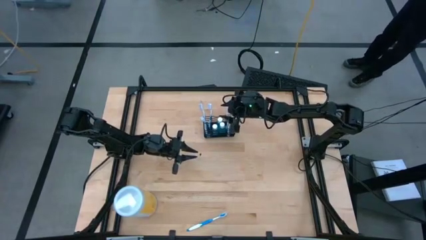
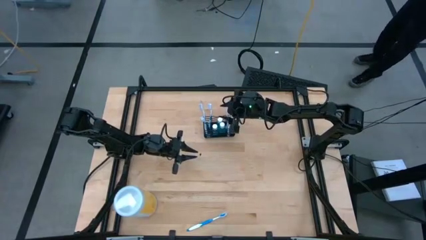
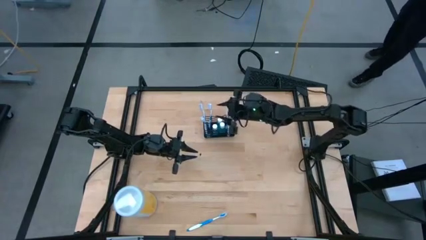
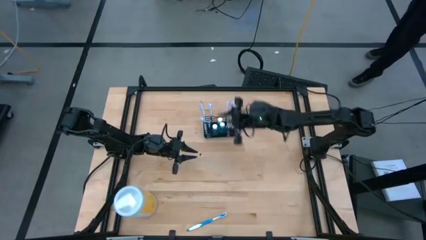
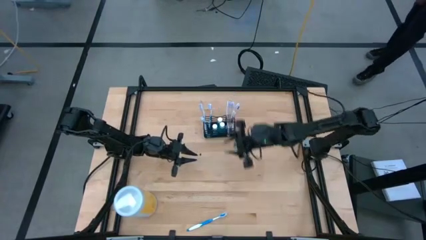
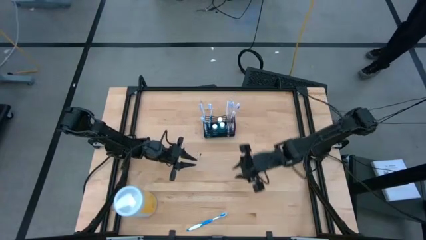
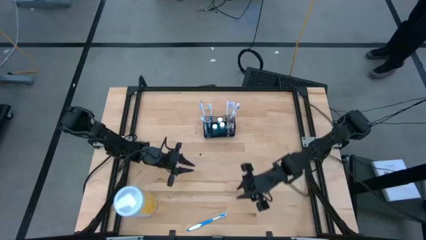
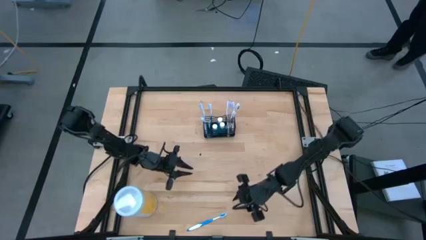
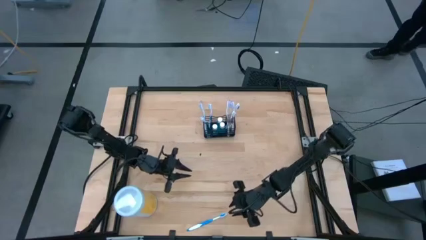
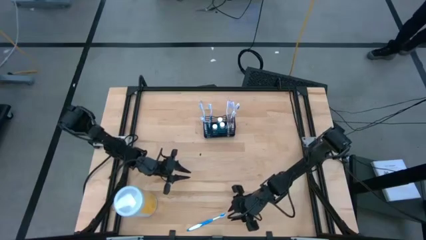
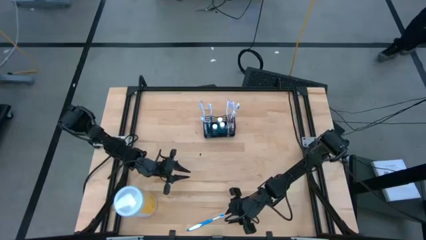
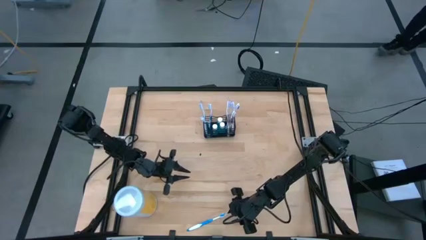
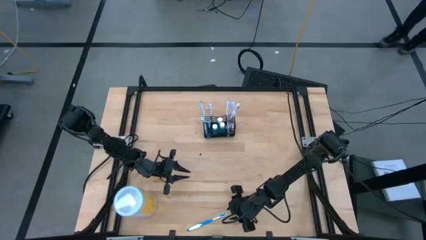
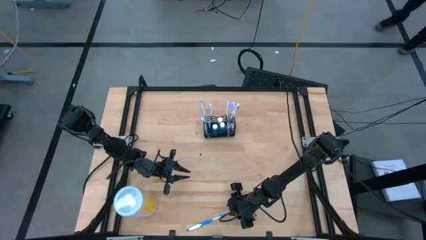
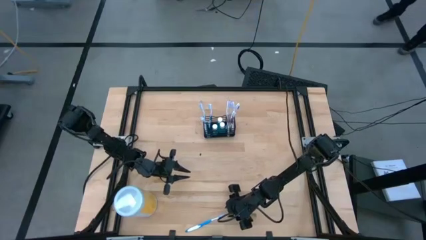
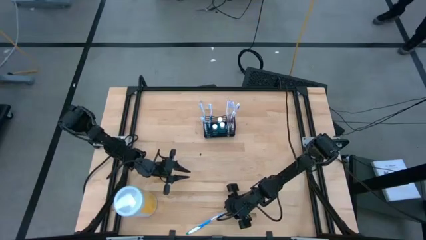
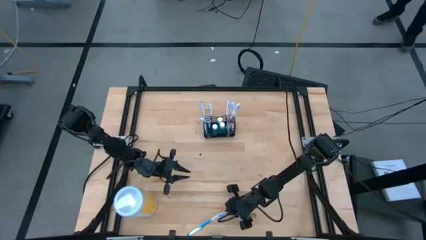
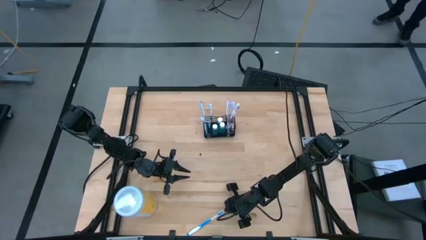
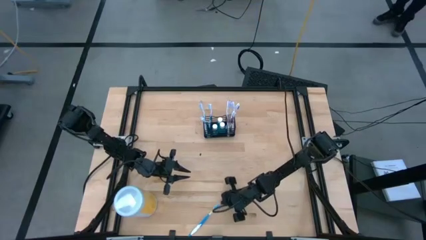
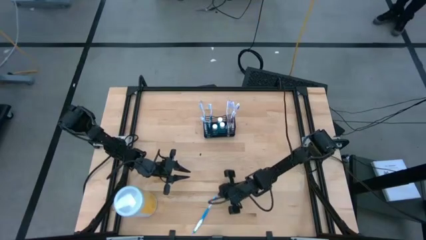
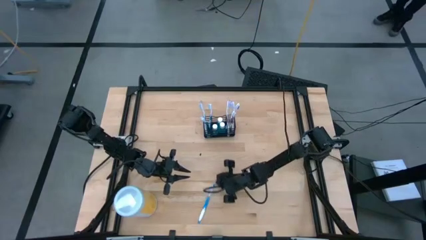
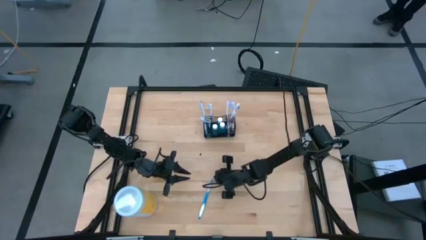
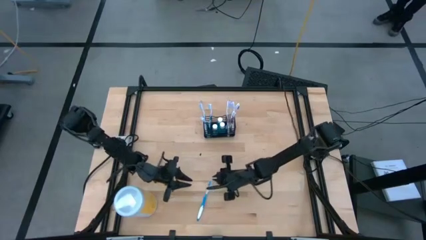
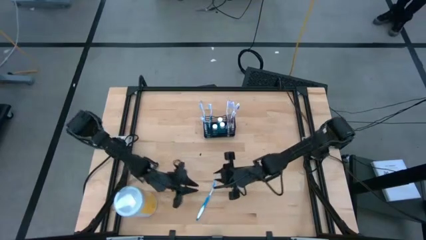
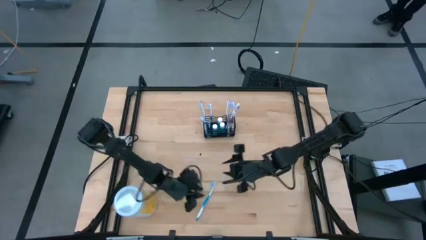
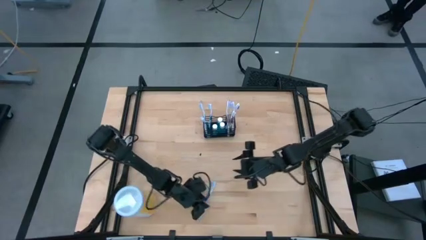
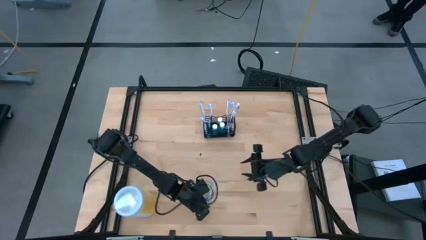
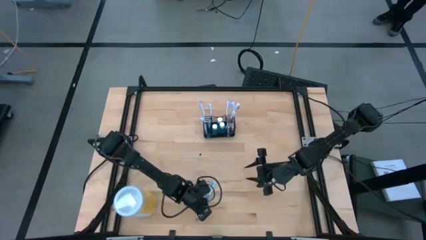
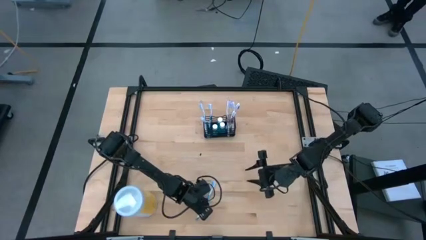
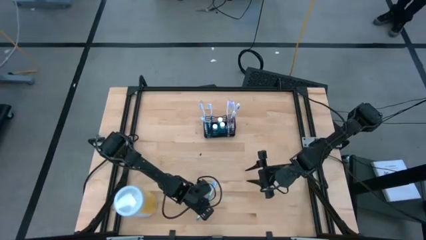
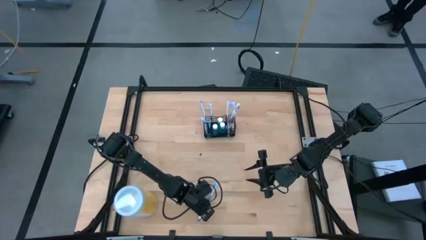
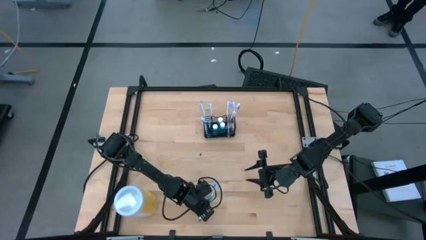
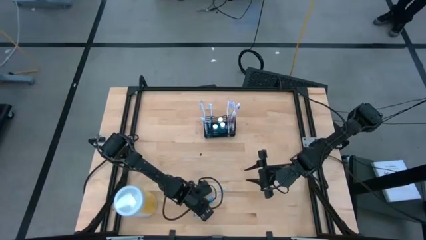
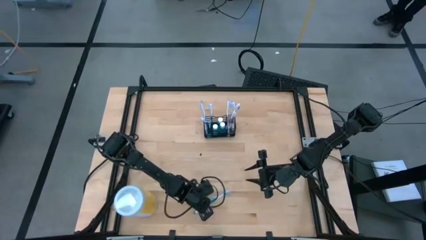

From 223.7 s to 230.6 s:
Task: Pick & Place toothbrushing station
Put the blue toothbrush into the black organizer

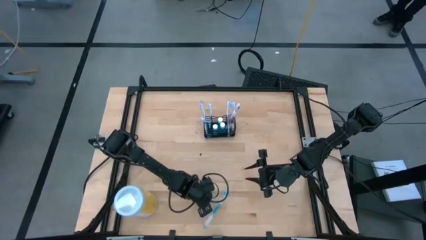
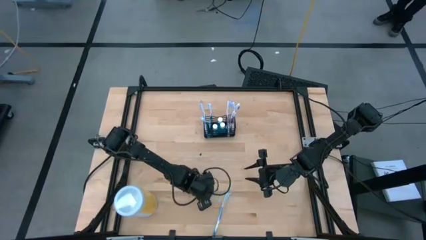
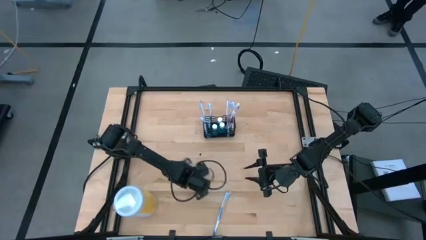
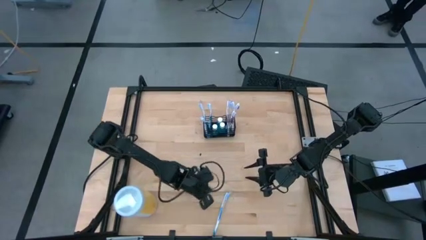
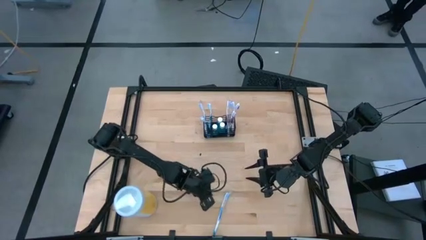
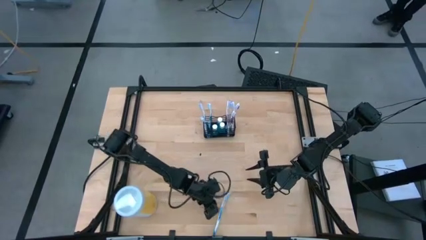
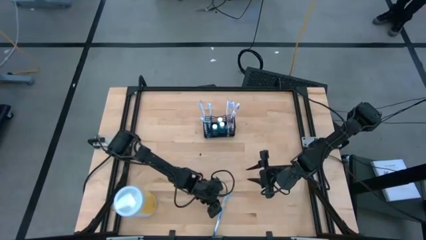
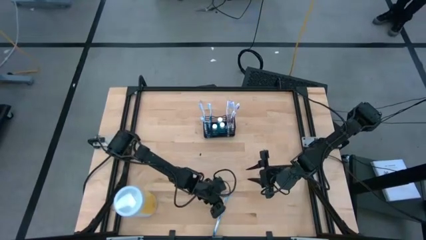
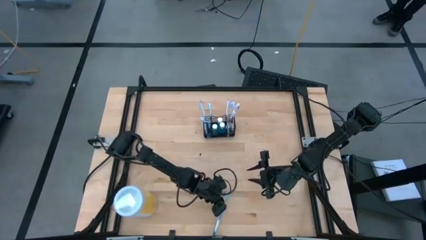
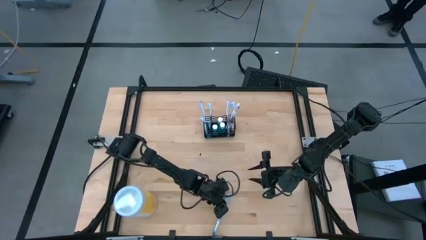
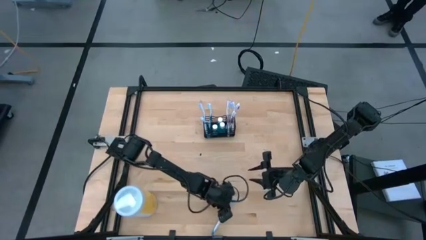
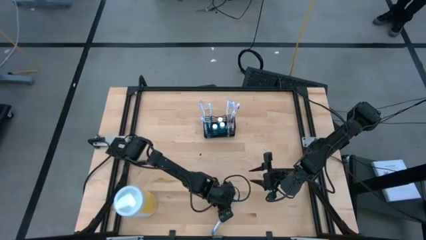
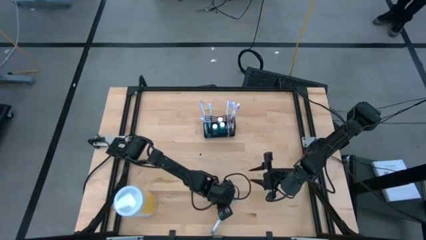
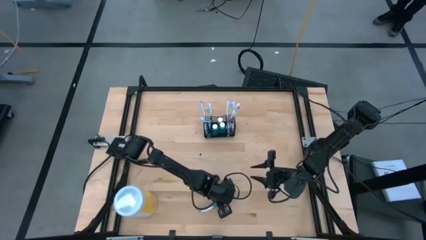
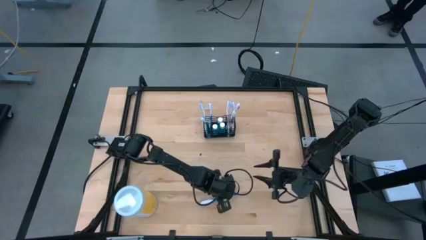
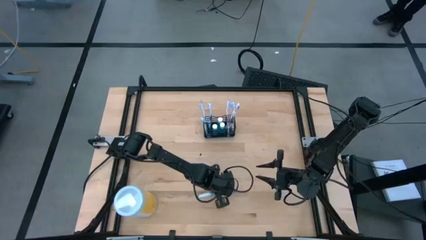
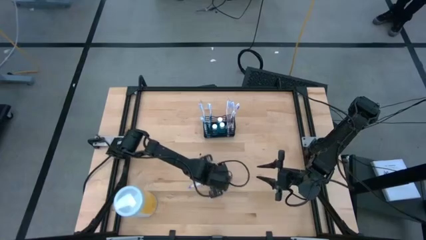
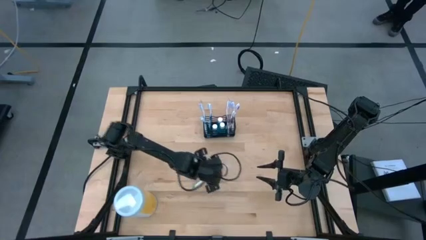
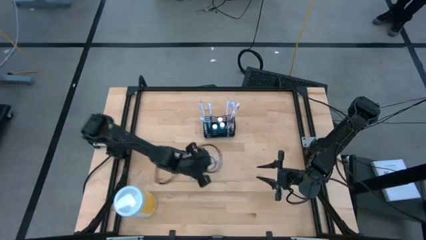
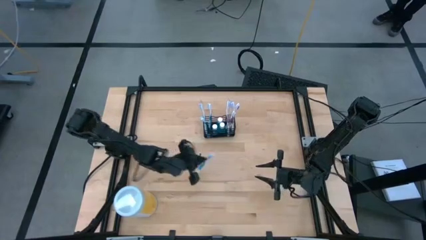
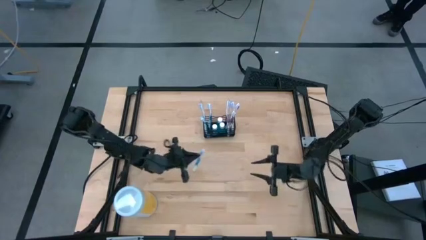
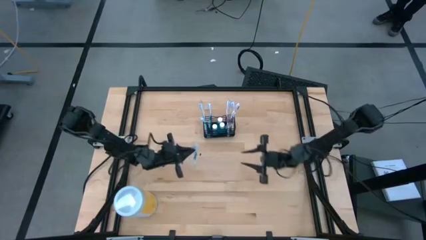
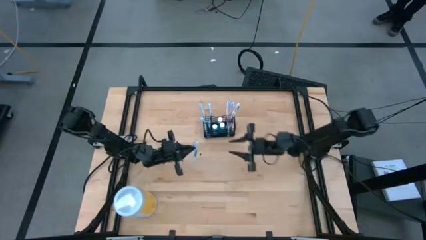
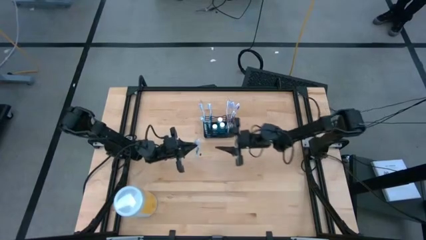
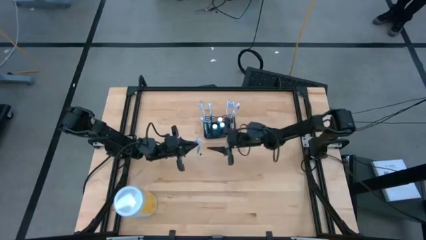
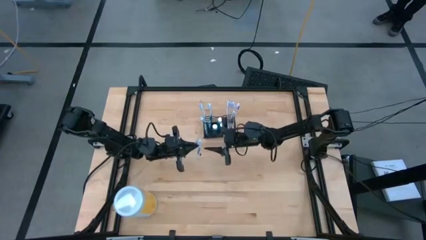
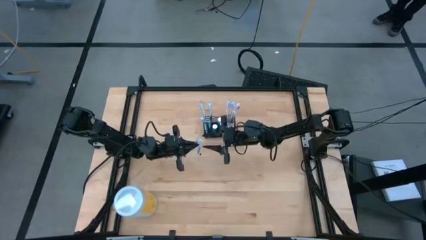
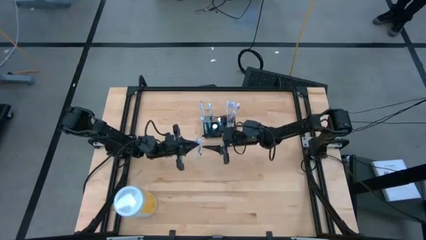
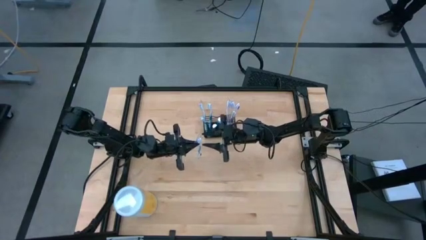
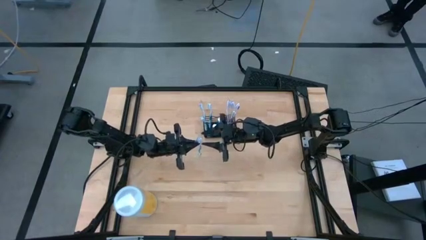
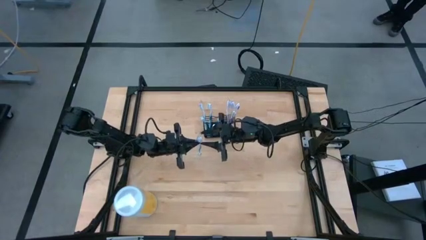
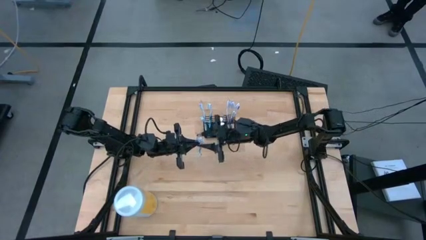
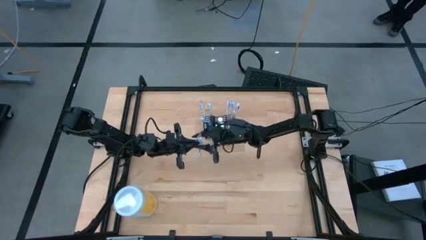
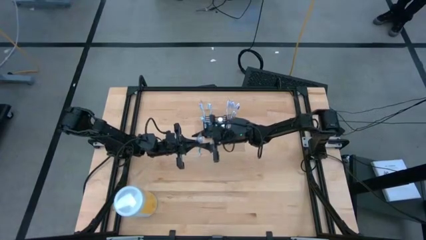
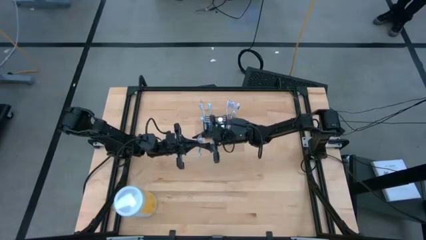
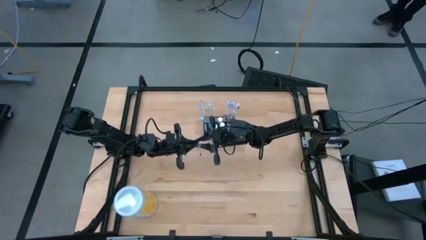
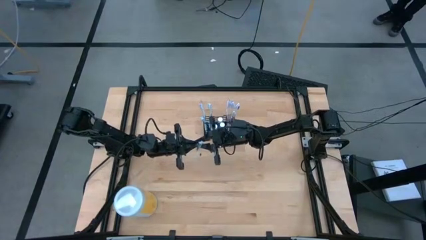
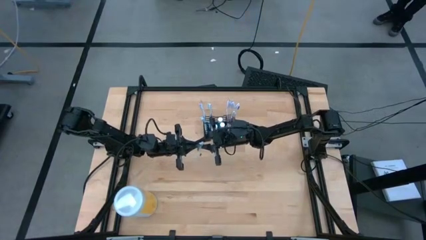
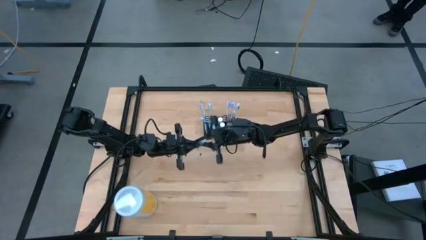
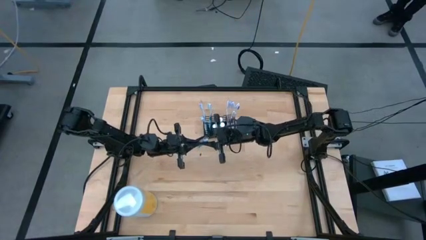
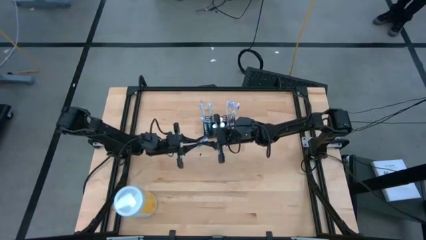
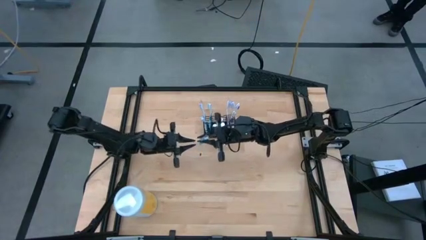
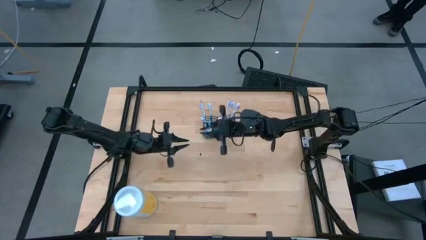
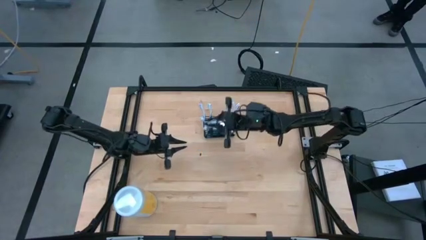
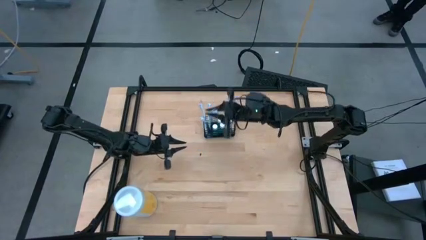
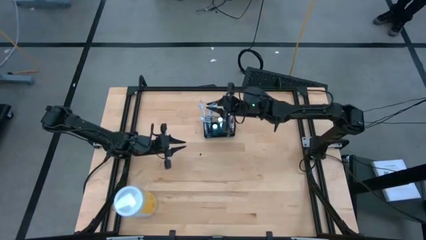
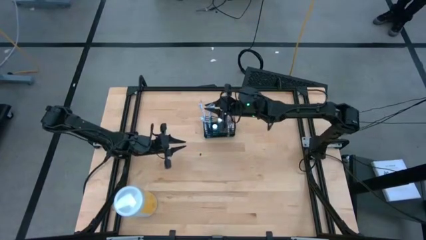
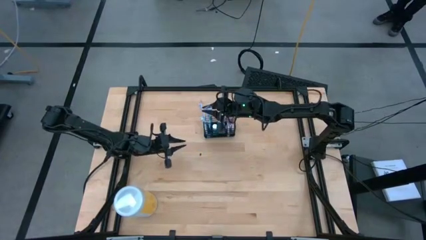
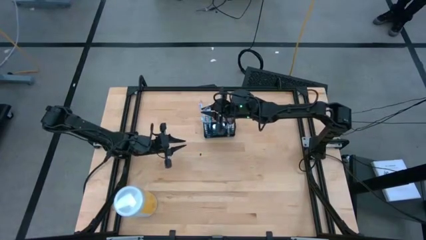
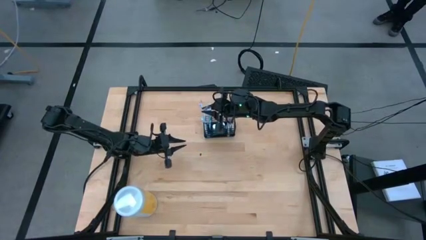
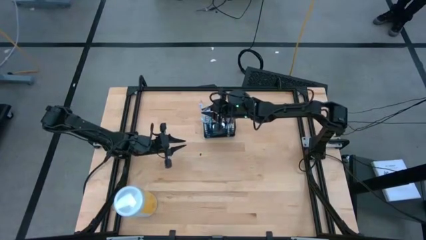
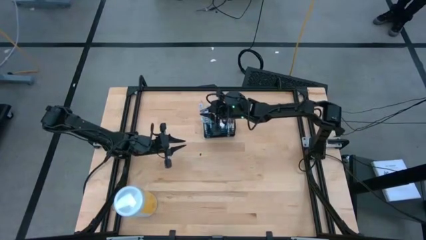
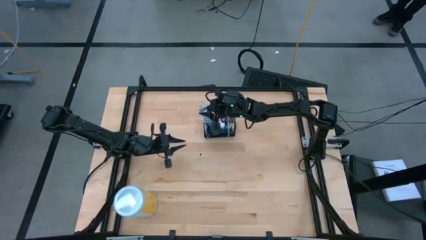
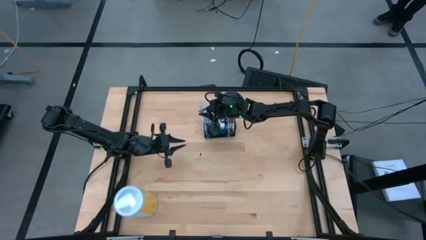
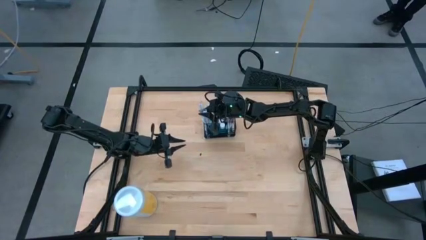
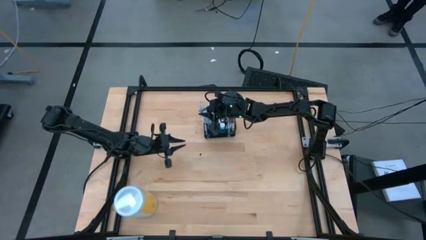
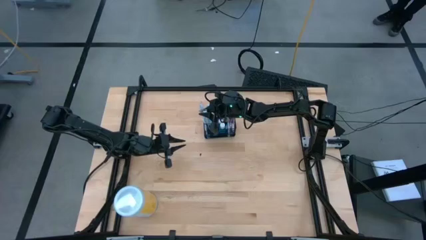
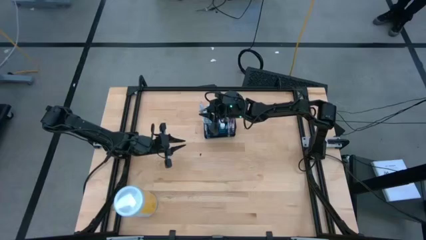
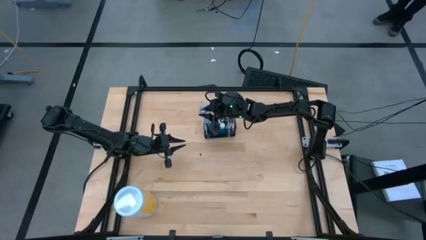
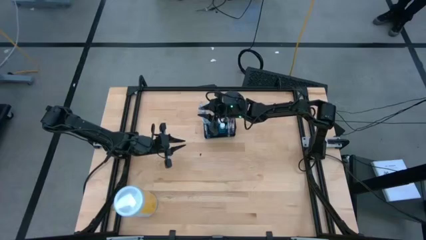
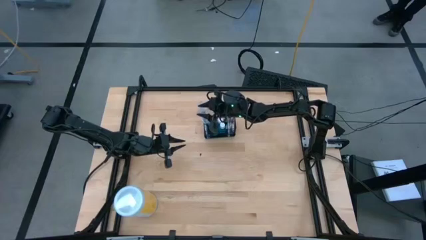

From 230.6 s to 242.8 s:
Put the blue toothbrush into the black organizer
